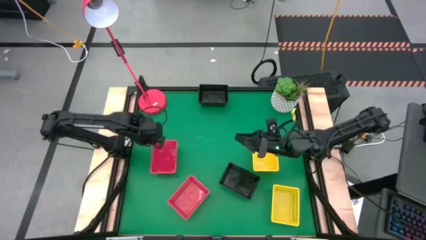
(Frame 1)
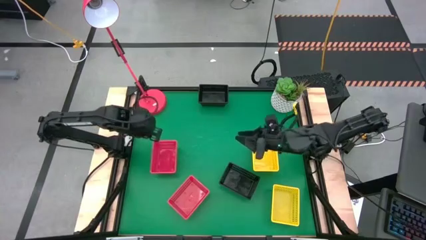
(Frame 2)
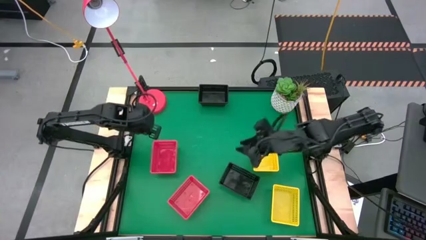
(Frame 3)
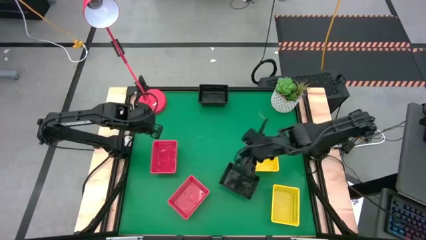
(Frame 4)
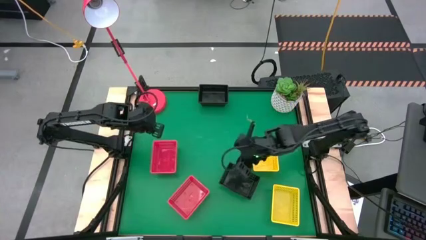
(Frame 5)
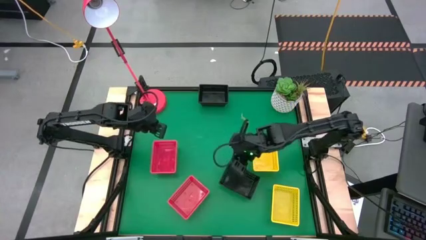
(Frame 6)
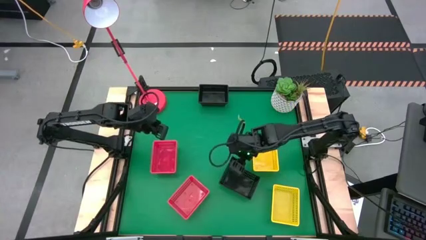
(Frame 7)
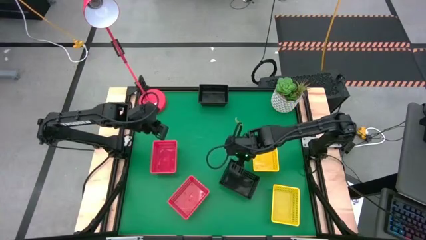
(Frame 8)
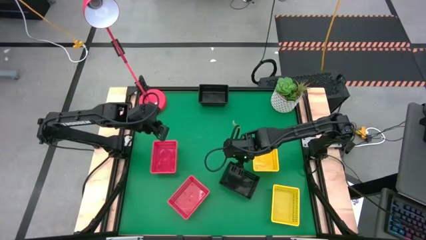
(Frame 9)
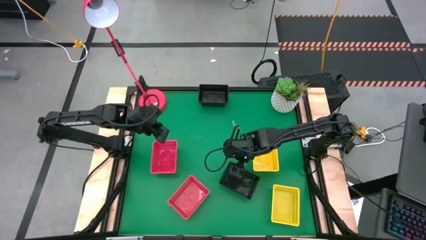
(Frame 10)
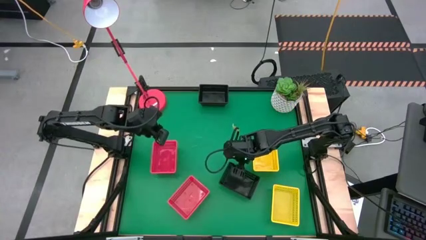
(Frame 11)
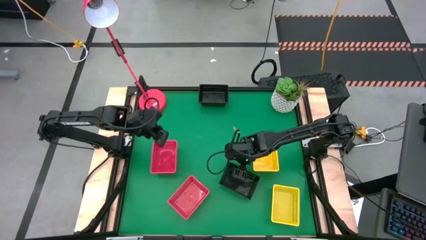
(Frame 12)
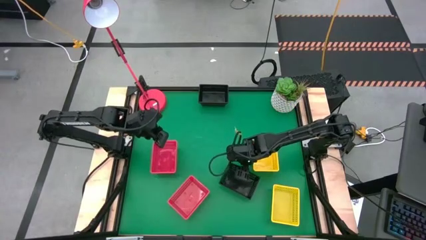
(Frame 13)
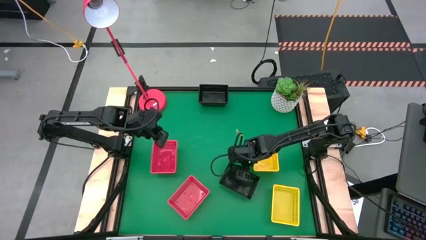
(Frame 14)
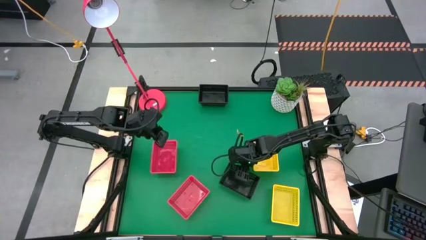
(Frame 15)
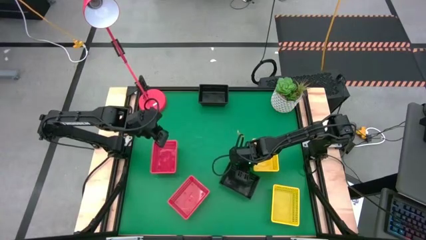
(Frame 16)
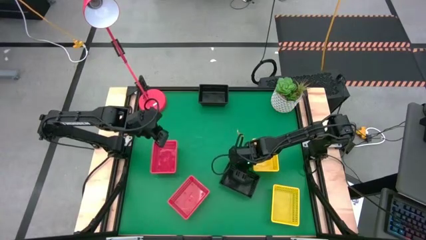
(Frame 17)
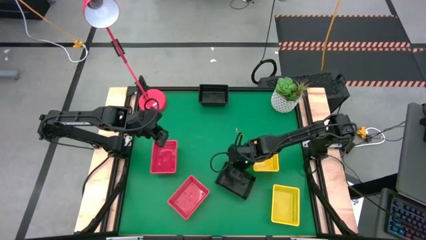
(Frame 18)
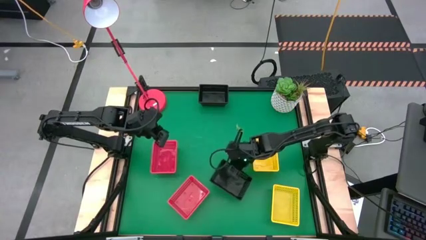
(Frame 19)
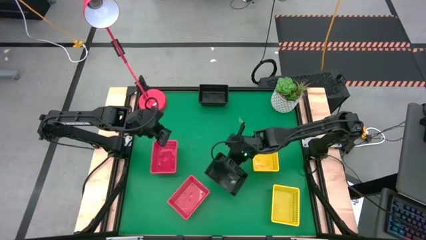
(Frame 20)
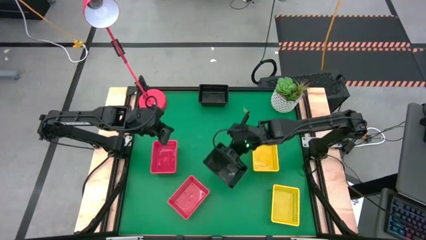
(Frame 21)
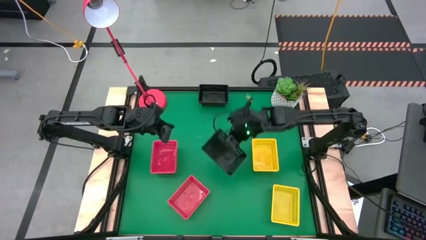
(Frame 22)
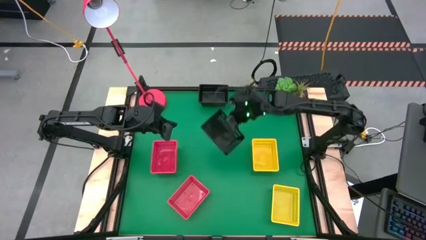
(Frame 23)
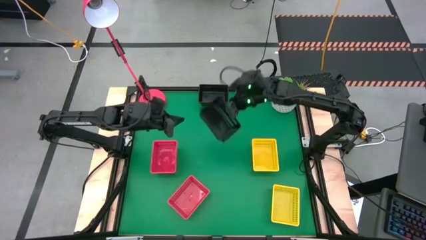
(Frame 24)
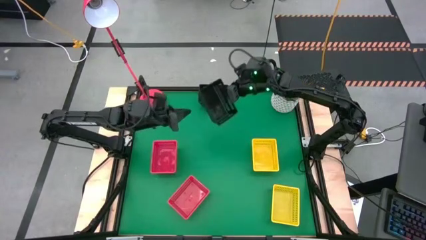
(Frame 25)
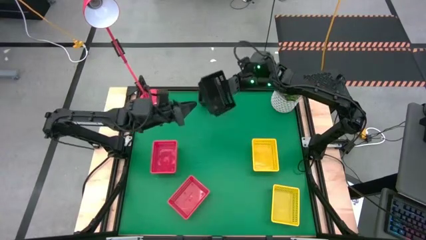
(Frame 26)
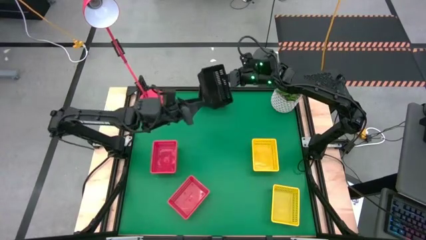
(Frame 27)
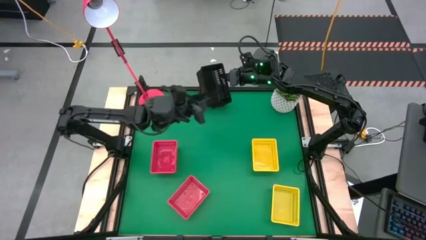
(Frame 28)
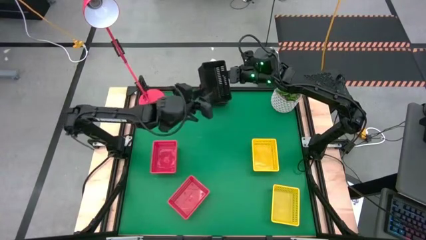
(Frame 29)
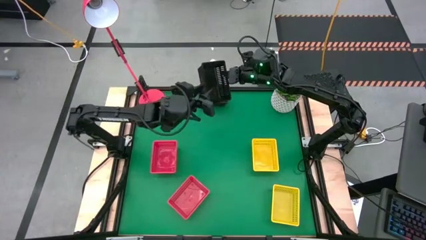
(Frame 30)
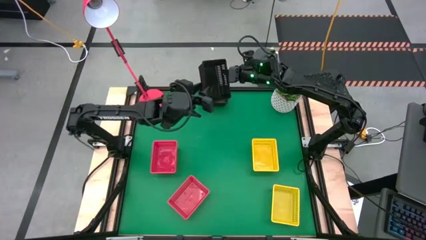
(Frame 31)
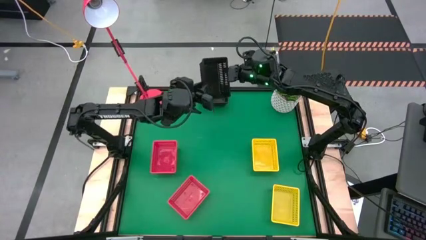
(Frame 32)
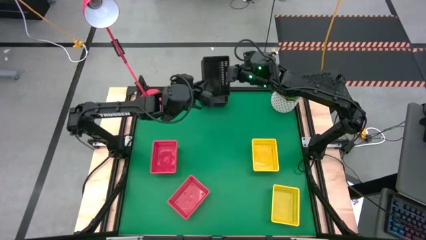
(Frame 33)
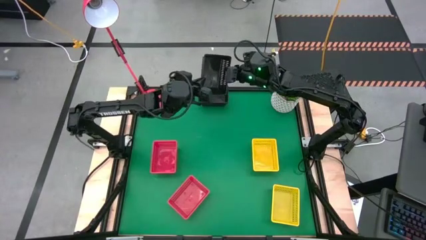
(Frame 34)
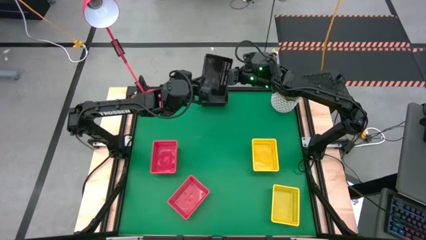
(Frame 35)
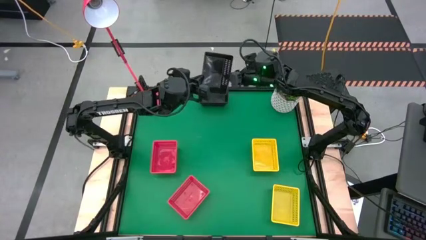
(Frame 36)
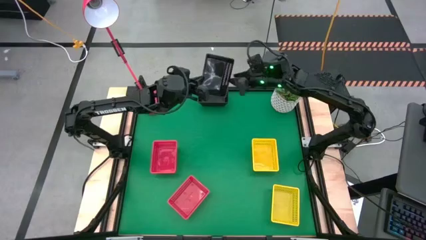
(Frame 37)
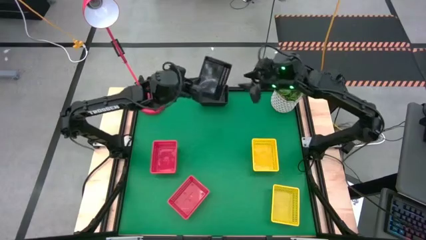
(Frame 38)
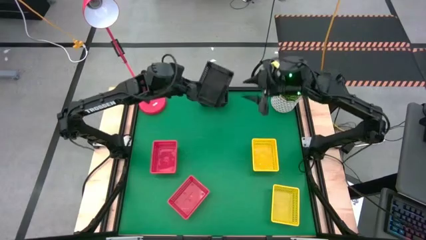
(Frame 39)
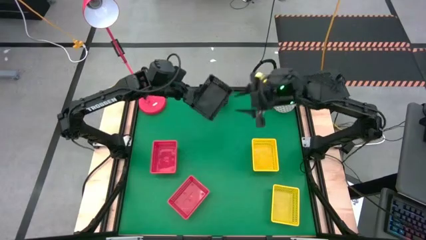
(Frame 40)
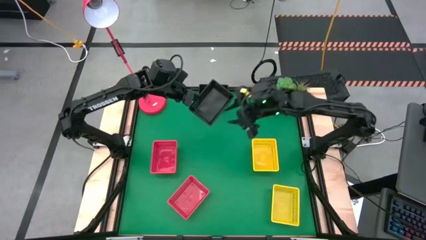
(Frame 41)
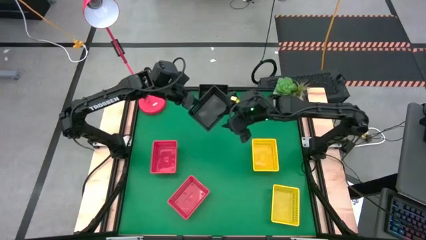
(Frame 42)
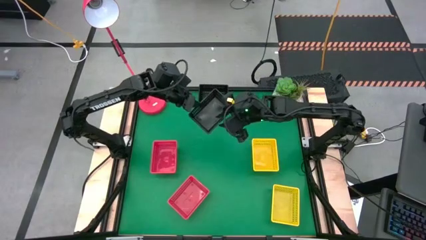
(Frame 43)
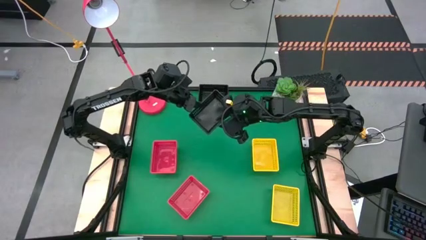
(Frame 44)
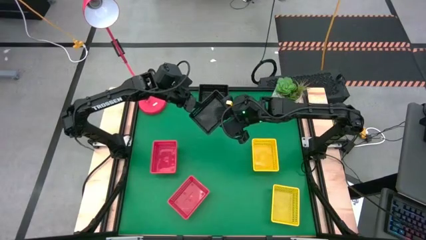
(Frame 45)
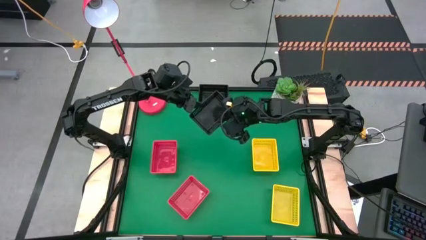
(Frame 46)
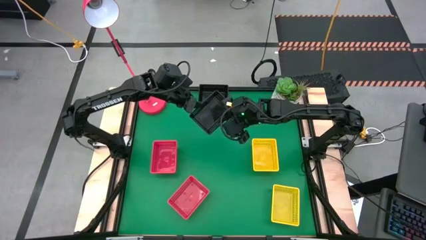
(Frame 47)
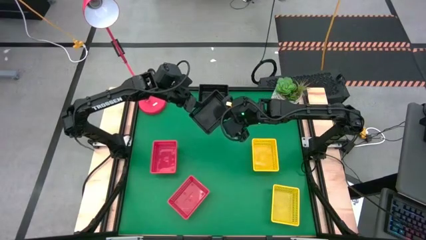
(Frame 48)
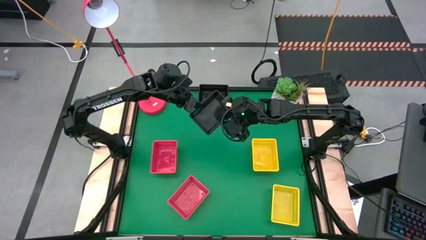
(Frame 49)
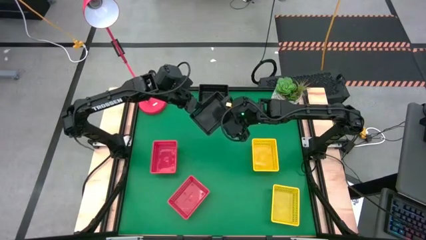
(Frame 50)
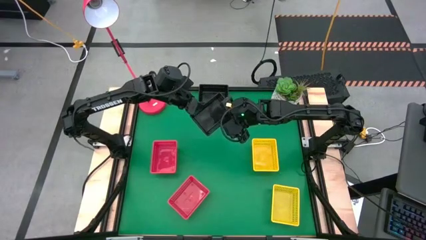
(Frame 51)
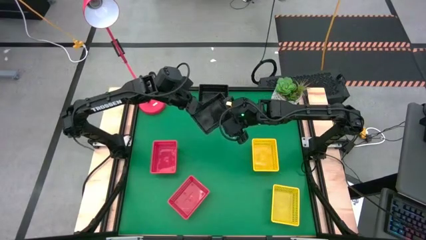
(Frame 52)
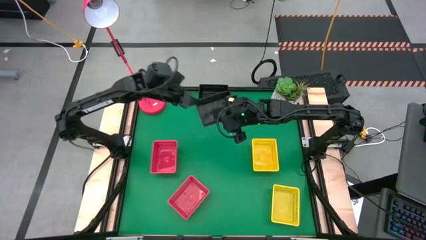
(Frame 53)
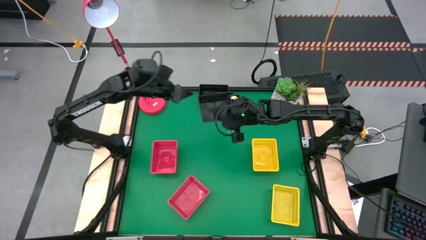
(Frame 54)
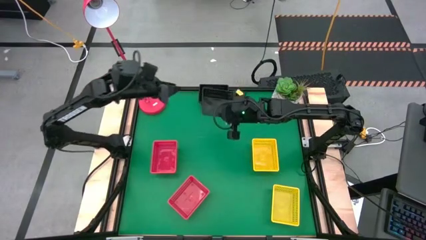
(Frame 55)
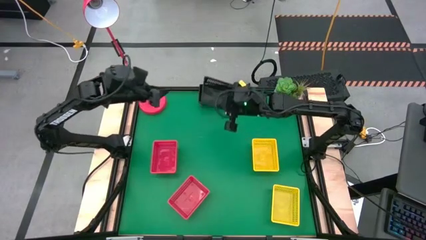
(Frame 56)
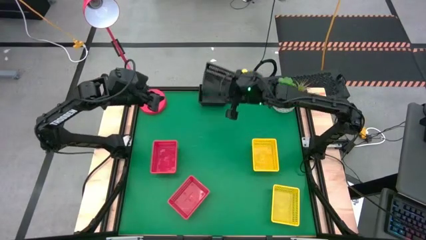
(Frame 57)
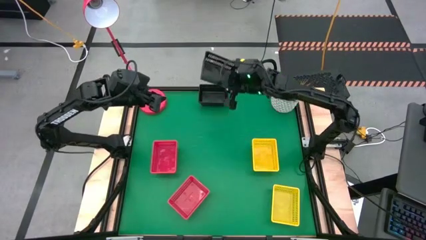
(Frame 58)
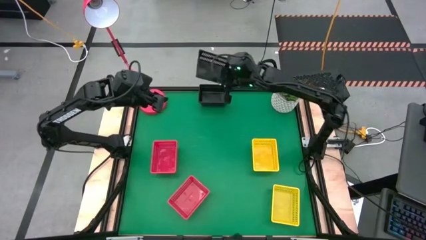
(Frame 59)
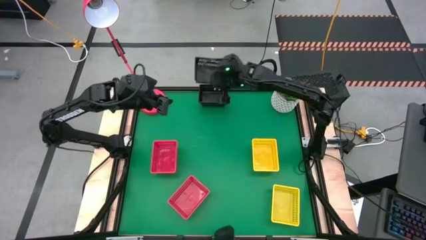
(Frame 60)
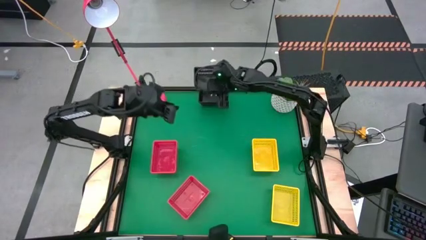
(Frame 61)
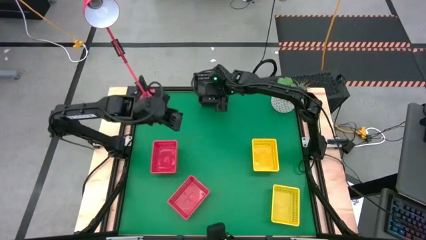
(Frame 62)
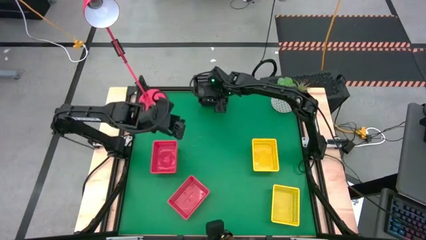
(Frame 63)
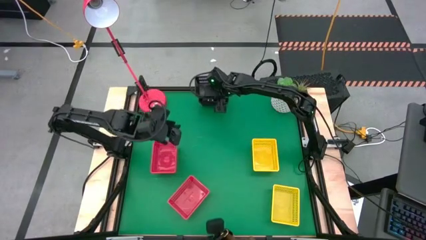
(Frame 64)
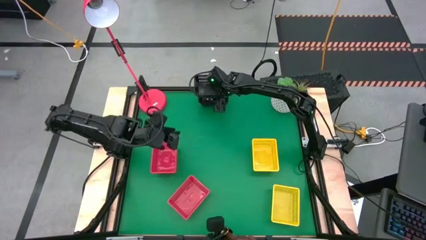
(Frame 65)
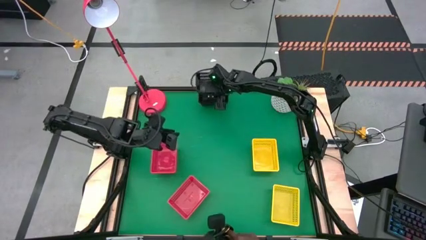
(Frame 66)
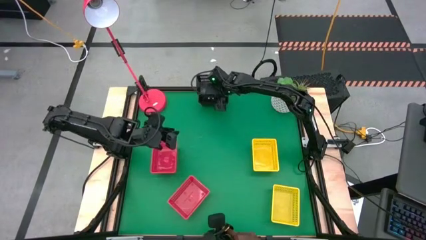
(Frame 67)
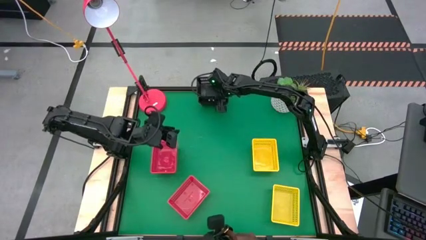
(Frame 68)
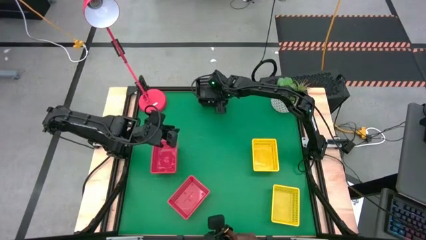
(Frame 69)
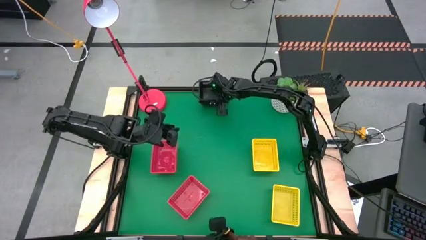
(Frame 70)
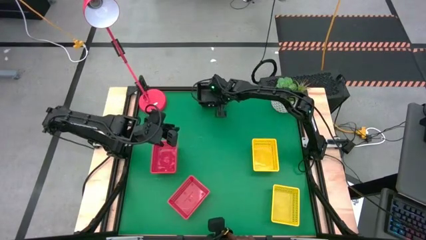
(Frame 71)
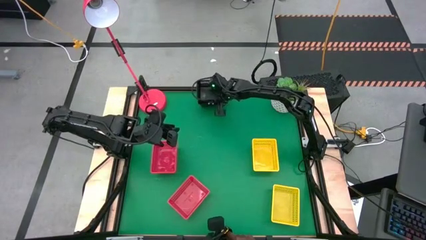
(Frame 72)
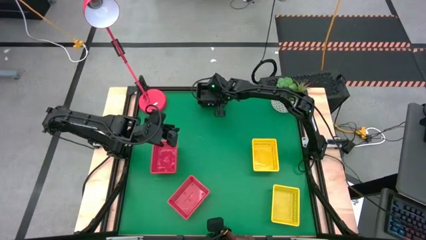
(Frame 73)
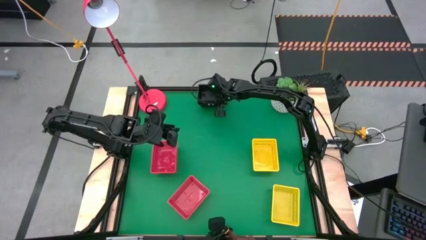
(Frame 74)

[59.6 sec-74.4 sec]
Stack the bottom black bin on the top stacked black bins
